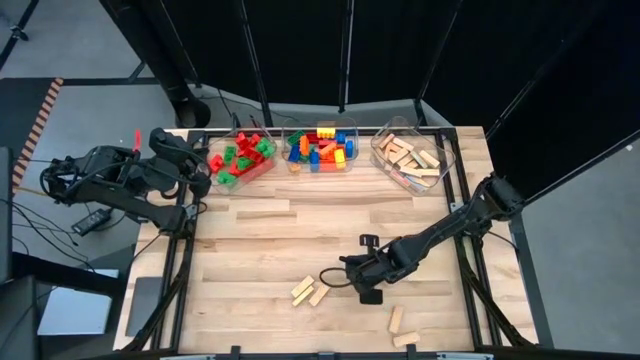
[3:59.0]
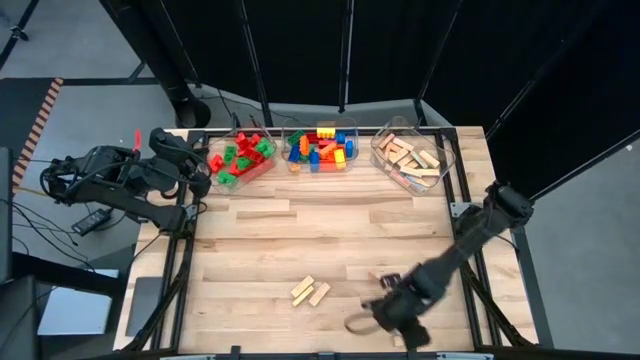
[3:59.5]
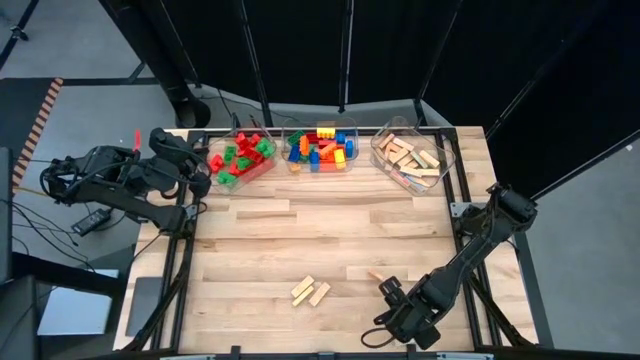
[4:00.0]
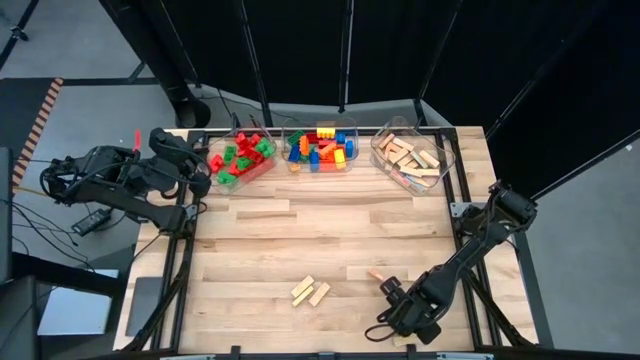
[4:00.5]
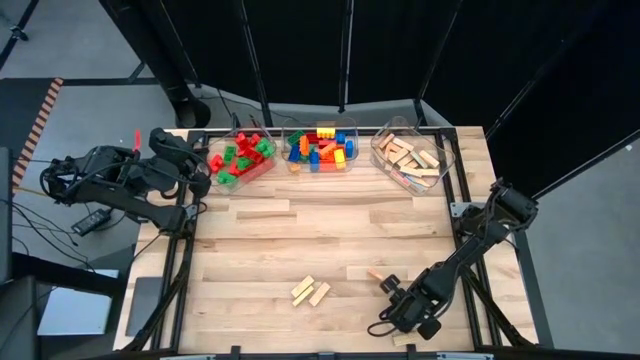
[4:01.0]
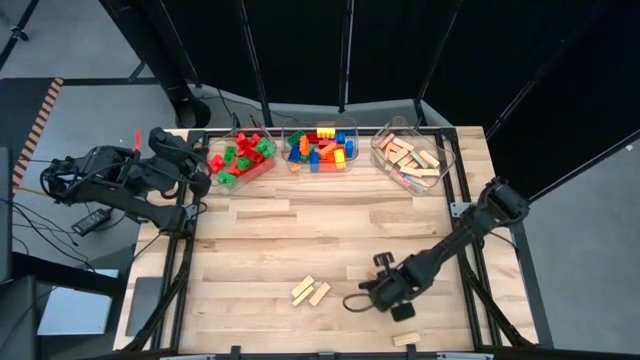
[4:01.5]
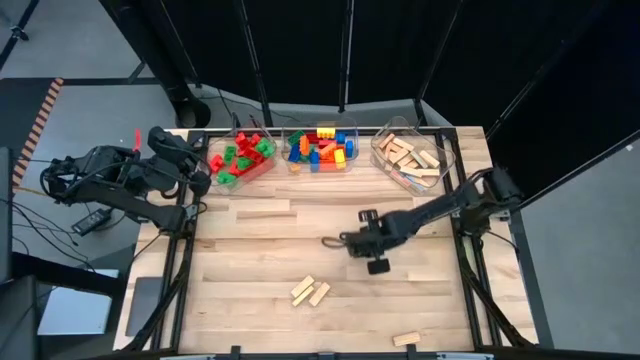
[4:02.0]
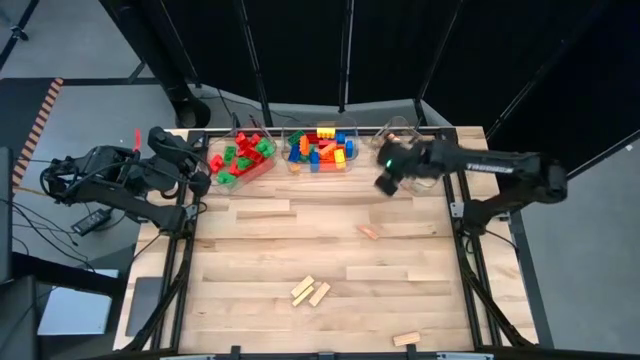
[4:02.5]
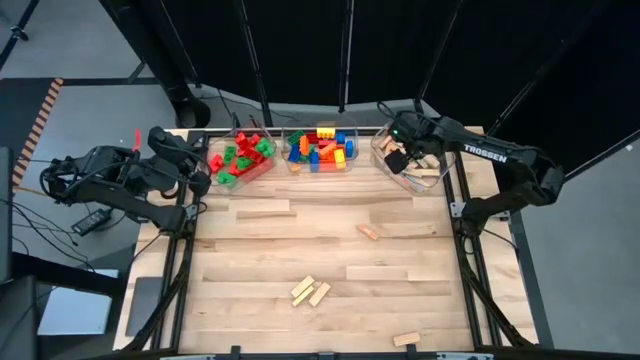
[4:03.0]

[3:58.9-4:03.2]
Task: Sort blocks by size
Put the brown wooden block into the right transparent bin

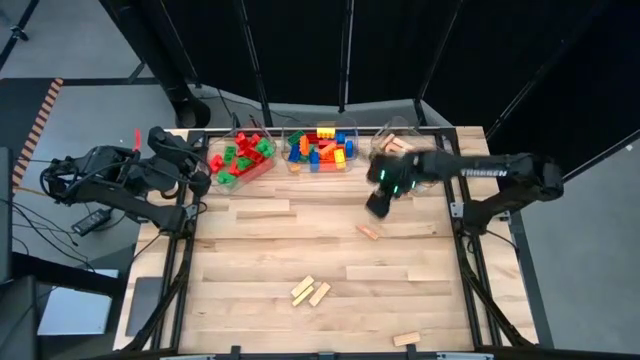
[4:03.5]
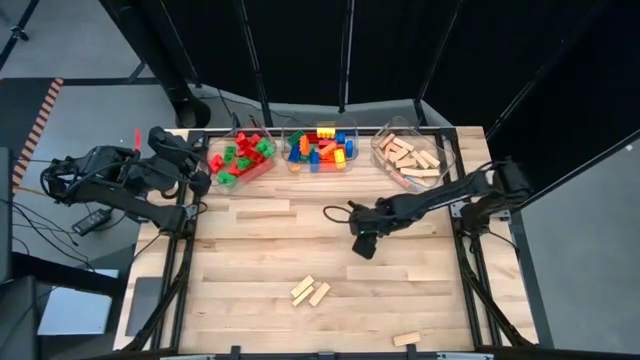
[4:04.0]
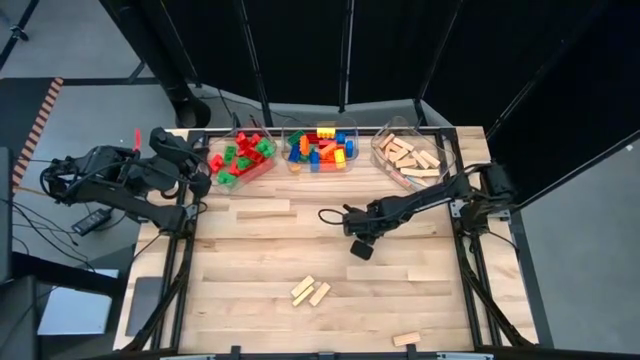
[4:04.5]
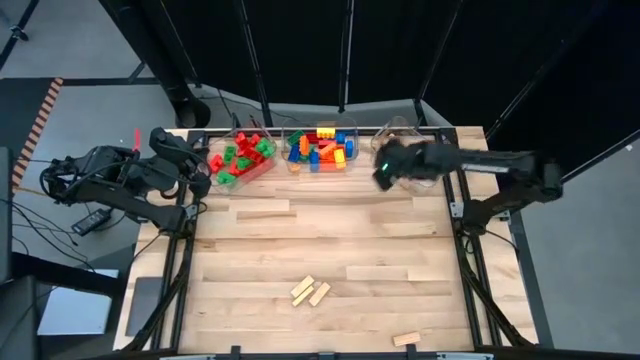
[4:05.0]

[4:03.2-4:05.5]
Put the brown wooden block into the right transparent bin

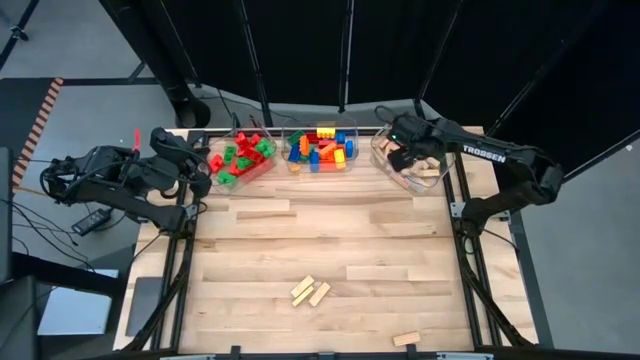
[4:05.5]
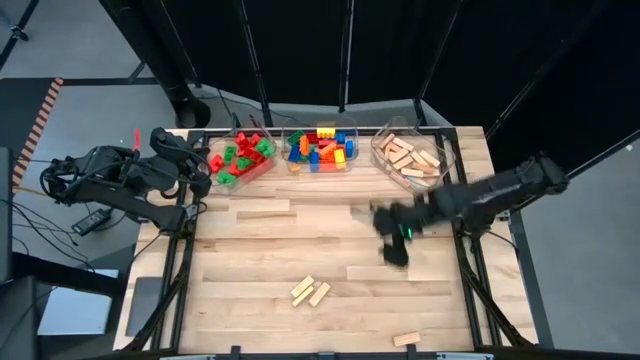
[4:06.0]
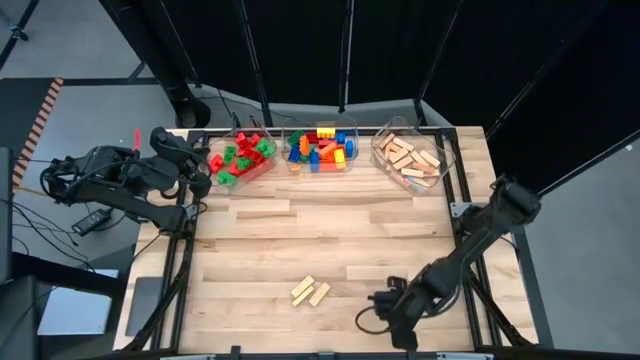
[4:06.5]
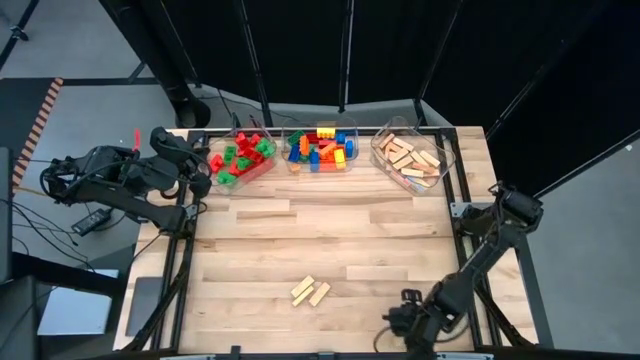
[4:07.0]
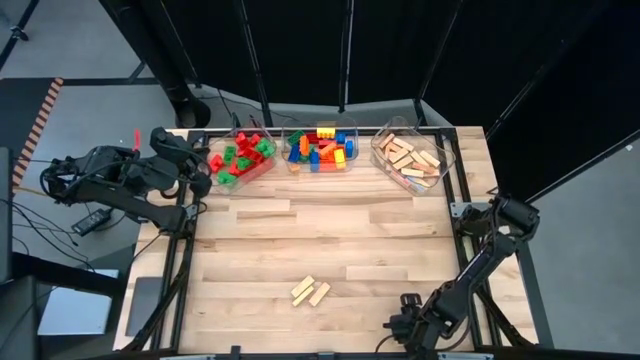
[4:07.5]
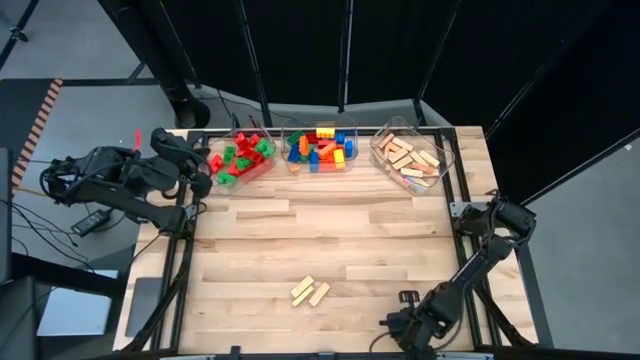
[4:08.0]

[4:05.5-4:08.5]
Put the brown wooden block into the right transparent bin

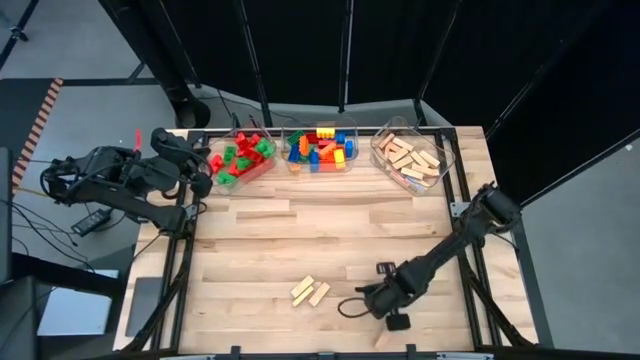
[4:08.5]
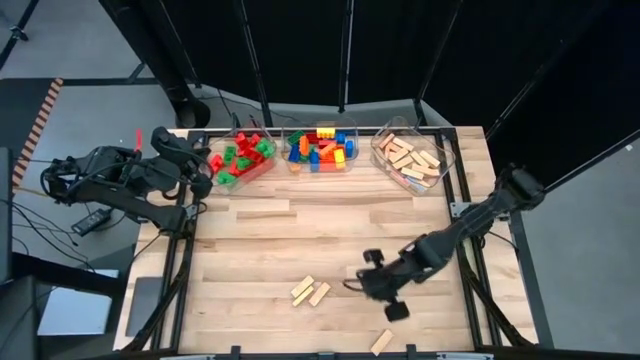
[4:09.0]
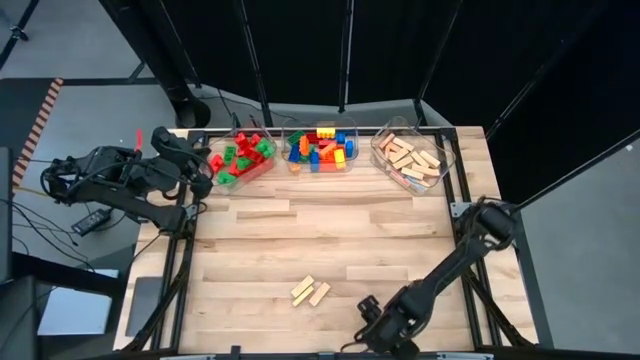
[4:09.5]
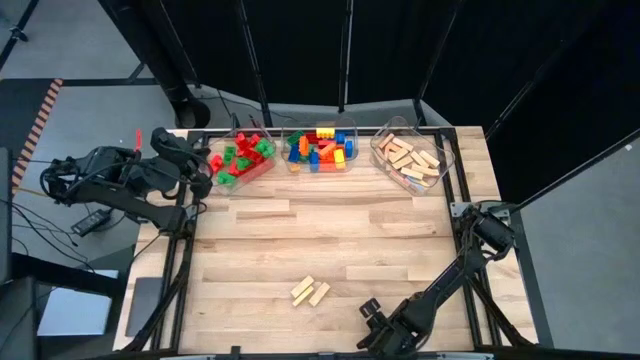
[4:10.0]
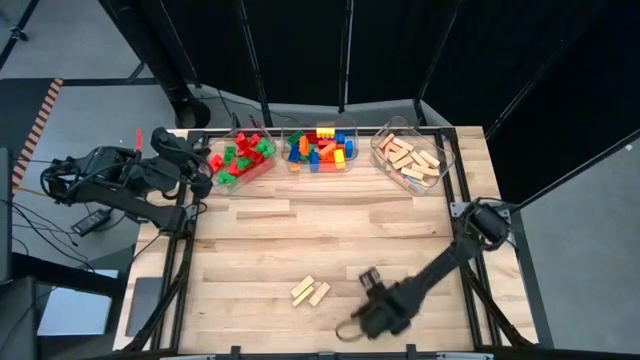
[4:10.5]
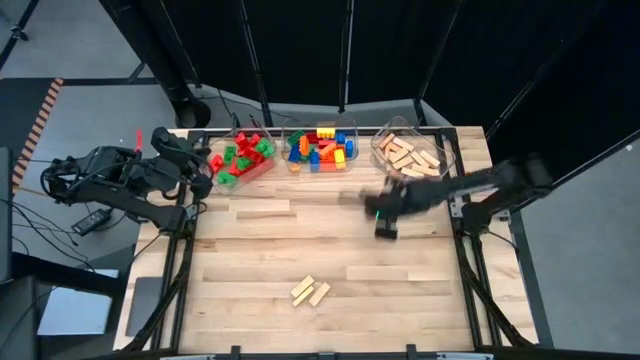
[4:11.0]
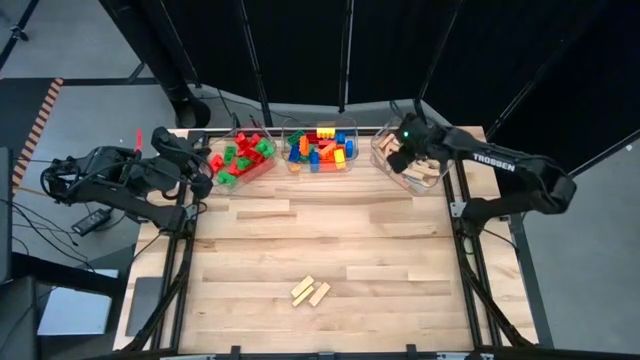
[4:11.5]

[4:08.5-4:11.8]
Put the brown wooden block into the right transparent bin

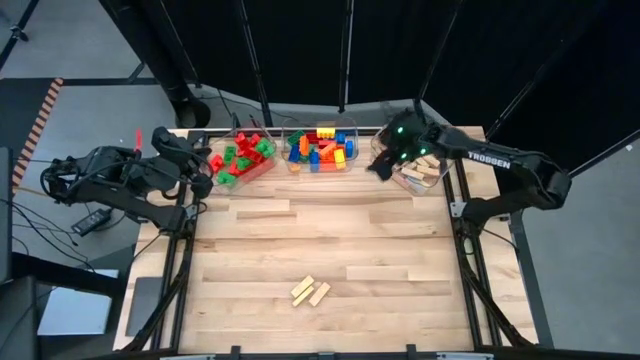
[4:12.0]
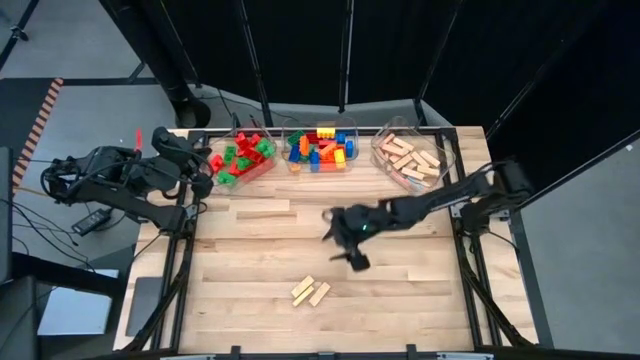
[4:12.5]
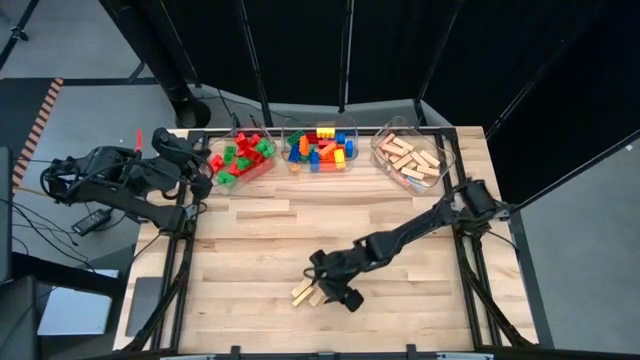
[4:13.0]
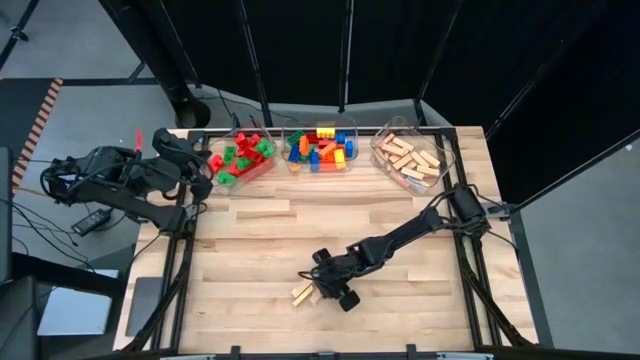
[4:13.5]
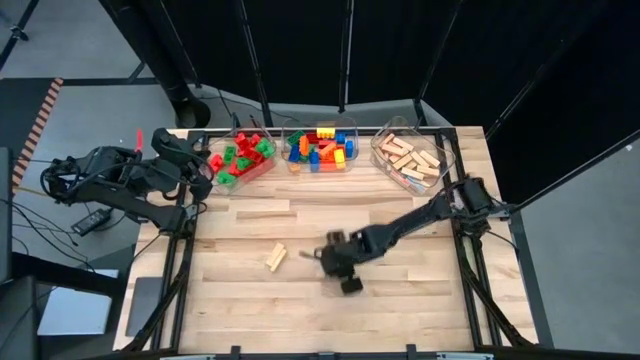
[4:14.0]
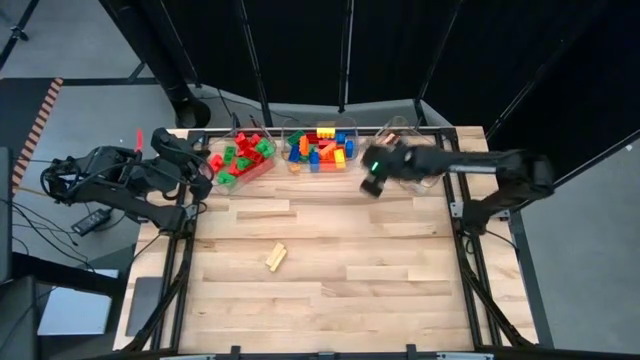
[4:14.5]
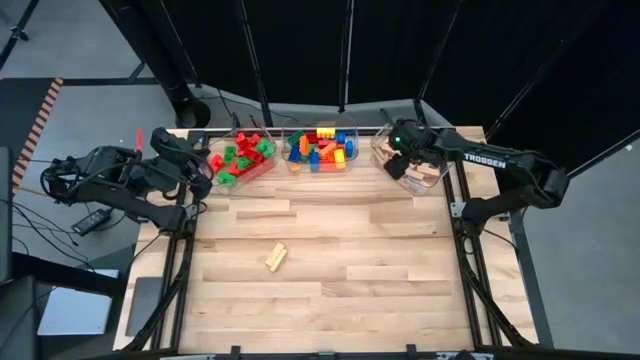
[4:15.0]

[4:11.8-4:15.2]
Put the brown wooden block into the right transparent bin

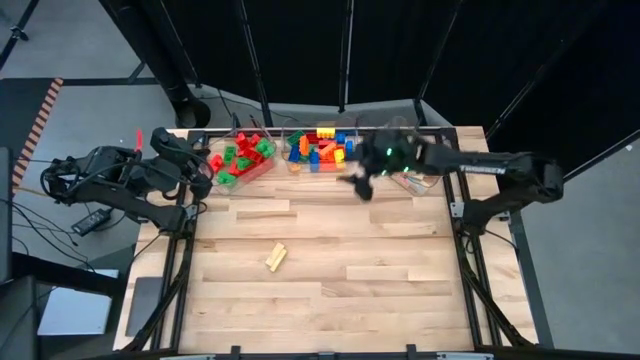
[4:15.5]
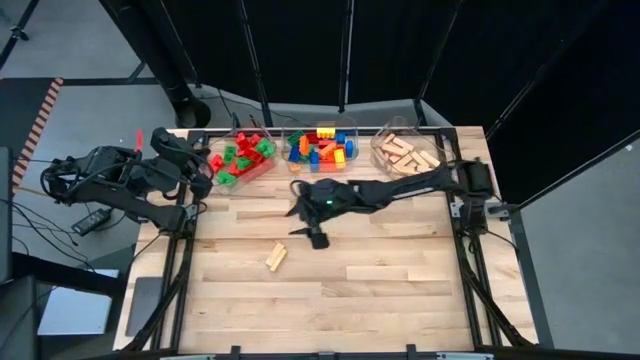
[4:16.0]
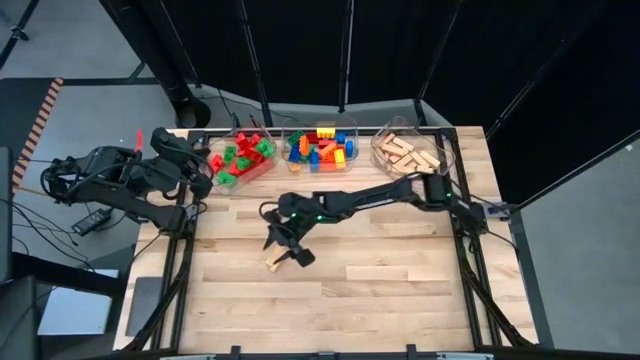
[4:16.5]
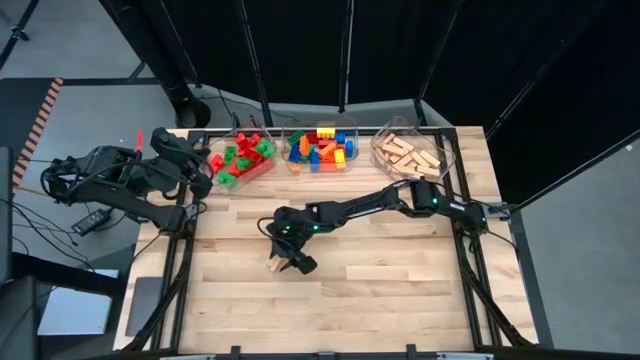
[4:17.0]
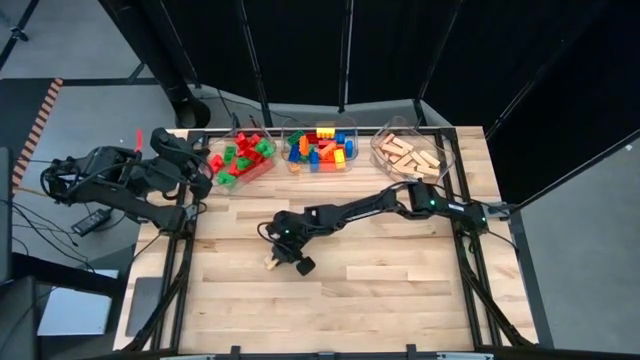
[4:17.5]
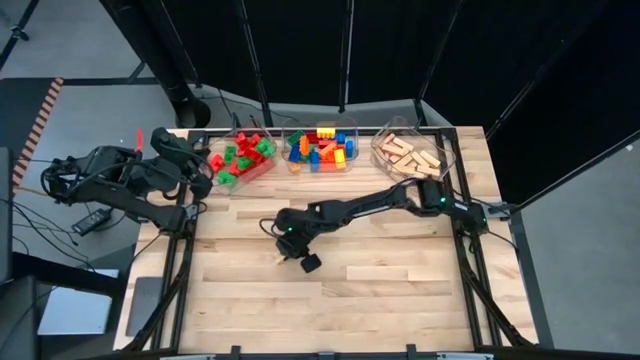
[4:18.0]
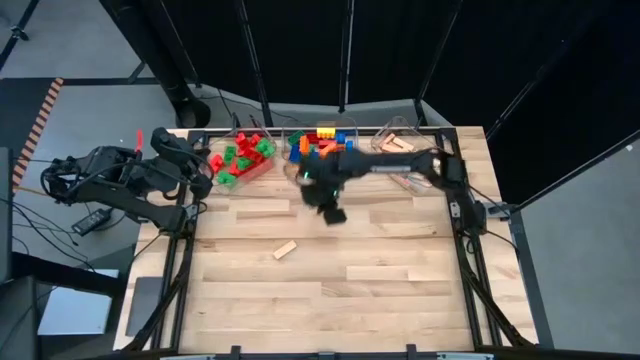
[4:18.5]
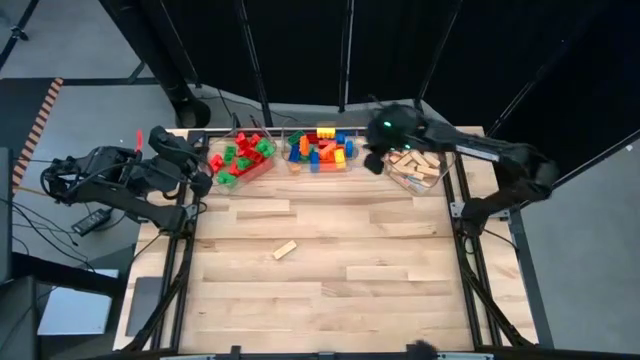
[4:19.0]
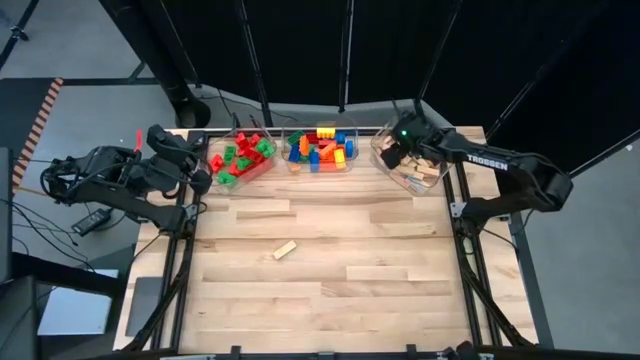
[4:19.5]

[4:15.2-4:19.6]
Put the brown wooden block into the right transparent bin
